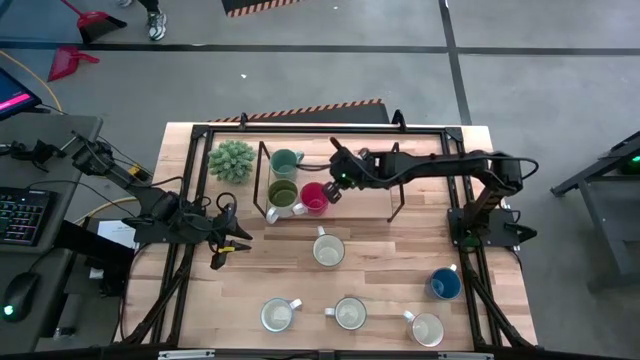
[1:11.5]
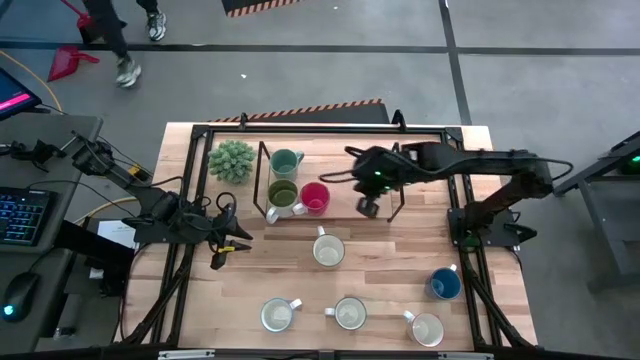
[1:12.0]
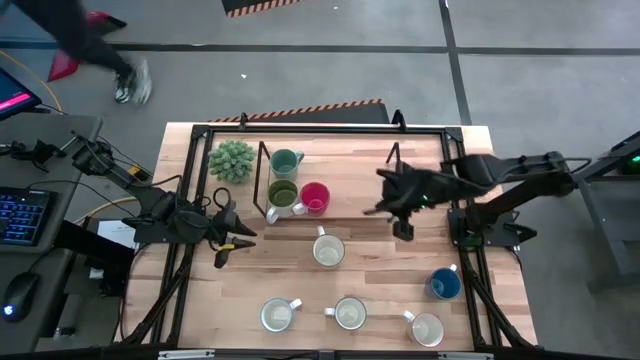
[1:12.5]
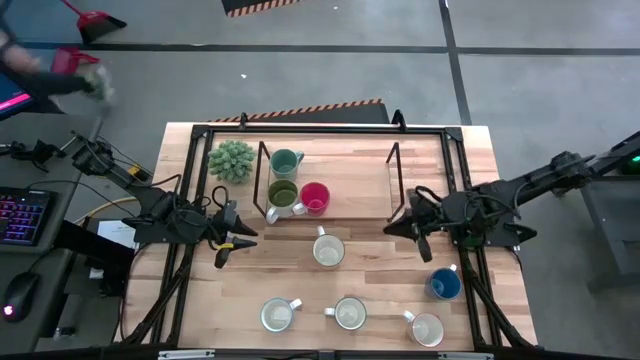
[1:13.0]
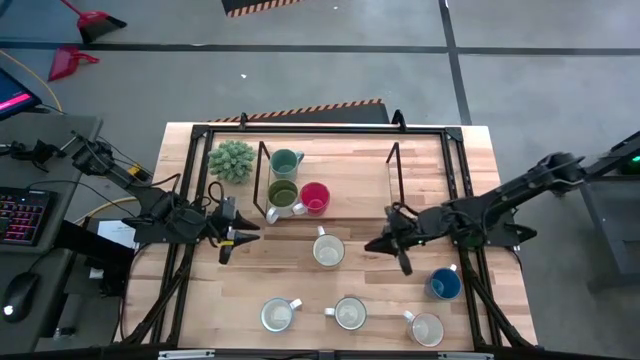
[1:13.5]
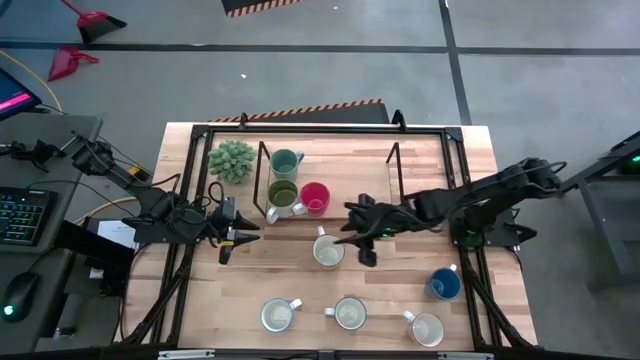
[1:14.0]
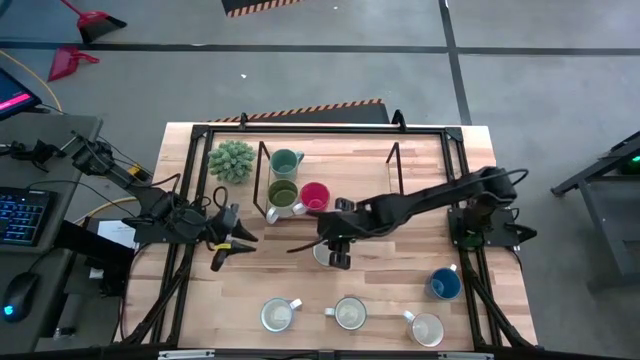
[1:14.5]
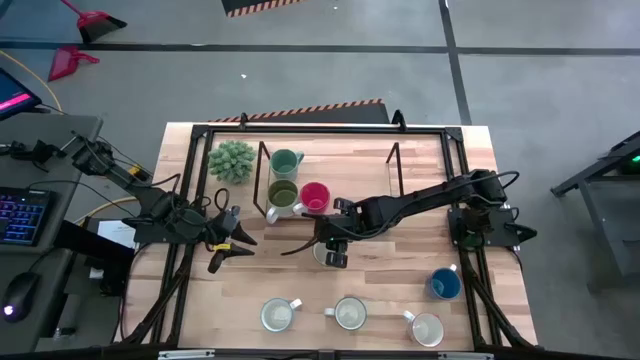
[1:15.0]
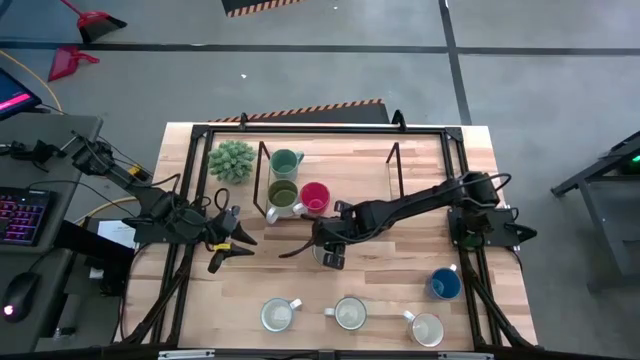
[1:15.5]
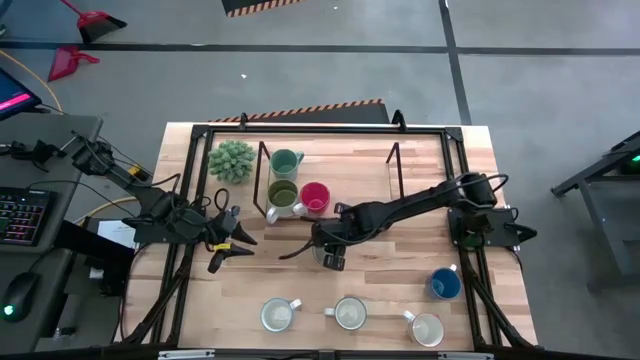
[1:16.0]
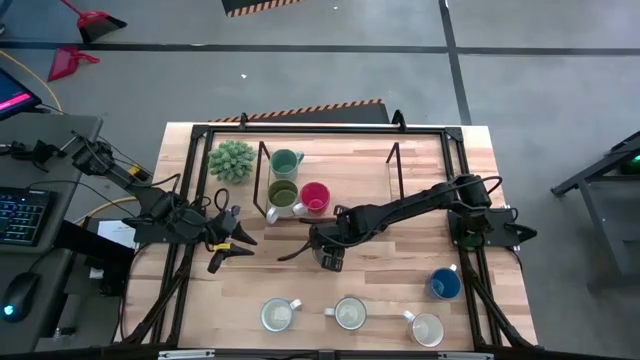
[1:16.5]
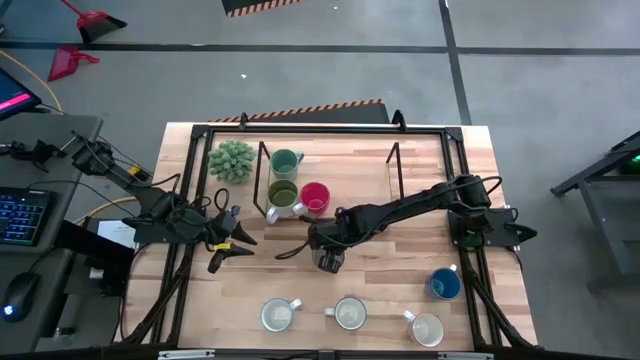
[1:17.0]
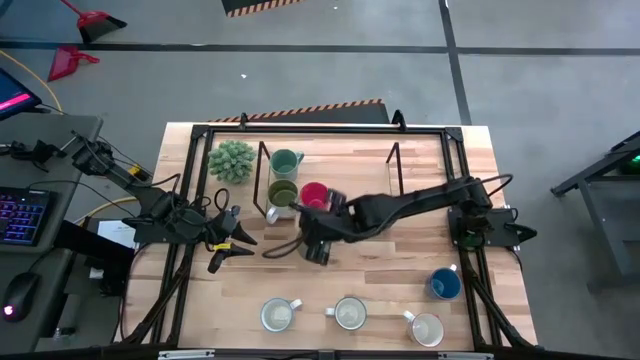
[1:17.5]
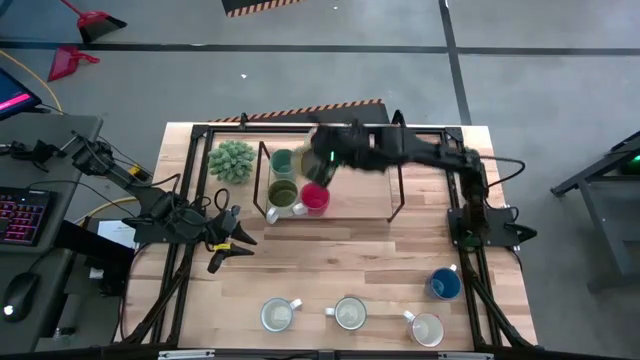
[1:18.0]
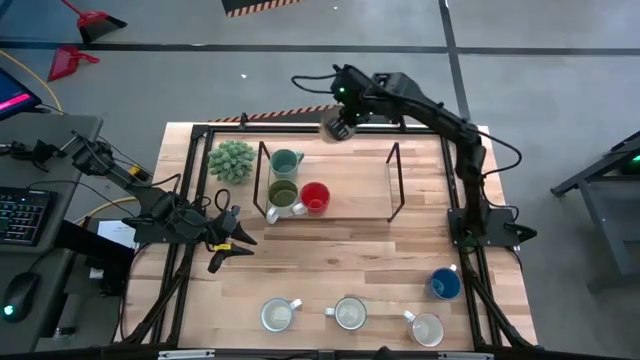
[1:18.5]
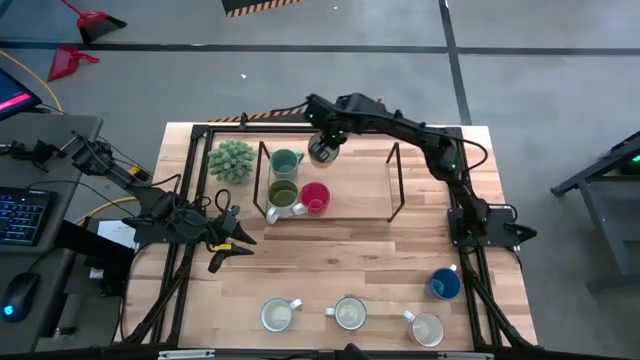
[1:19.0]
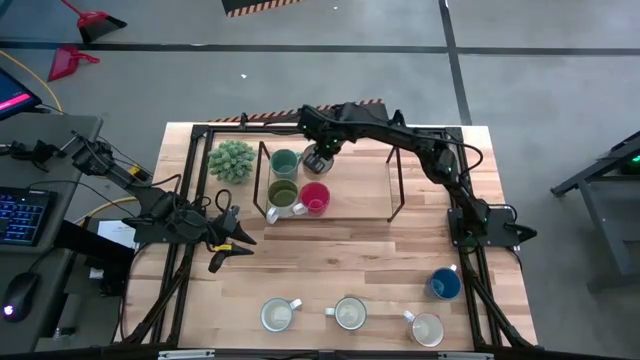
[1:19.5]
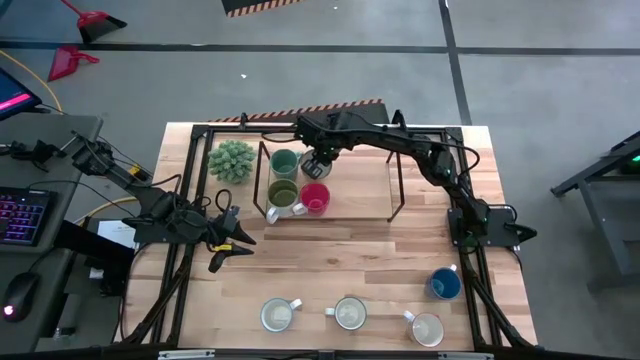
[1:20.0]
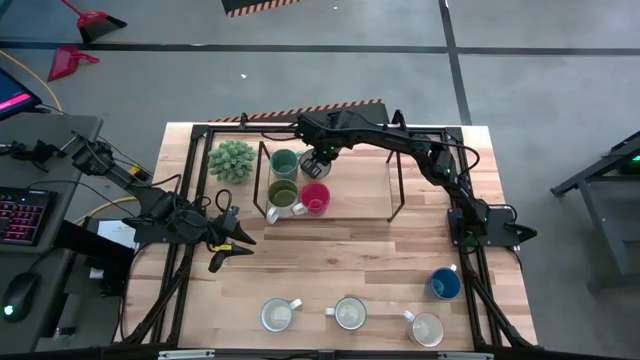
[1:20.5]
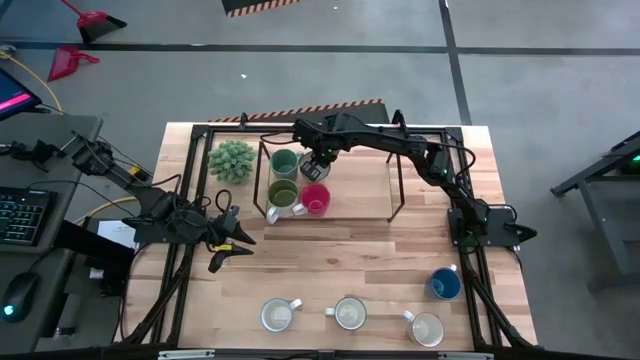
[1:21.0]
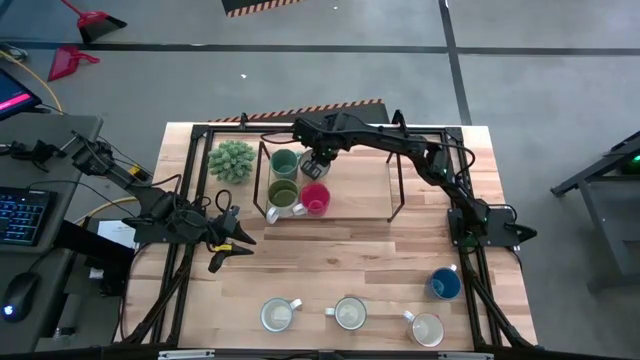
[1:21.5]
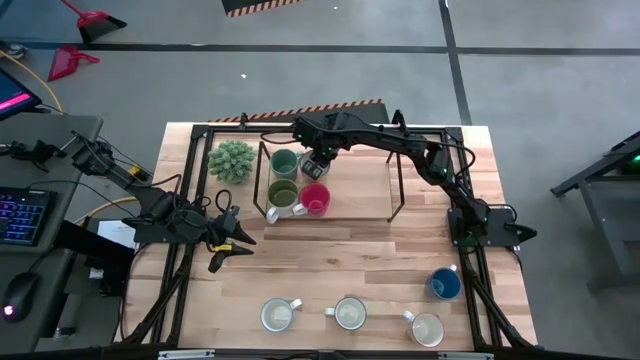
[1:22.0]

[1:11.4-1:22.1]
Task: Place coffee mugs
Put the yellow mug on the shelf
